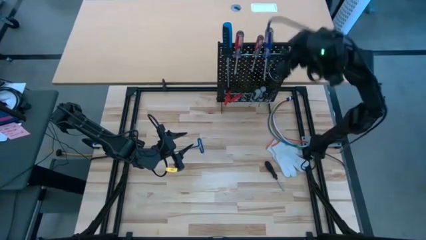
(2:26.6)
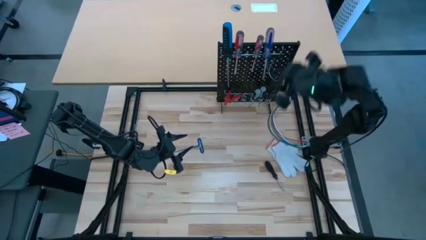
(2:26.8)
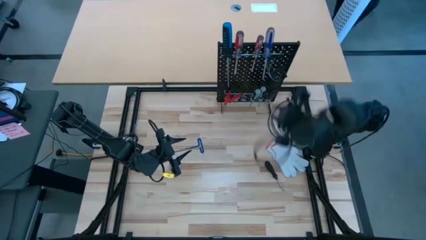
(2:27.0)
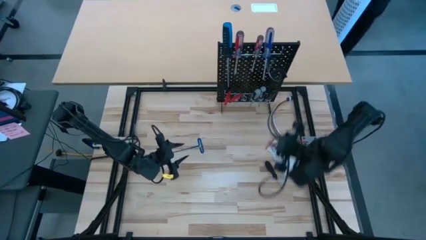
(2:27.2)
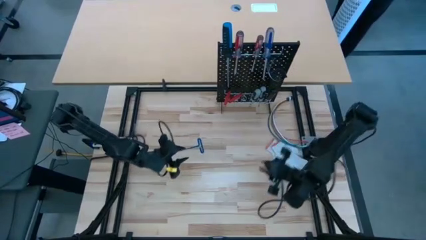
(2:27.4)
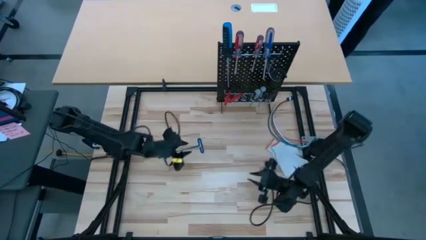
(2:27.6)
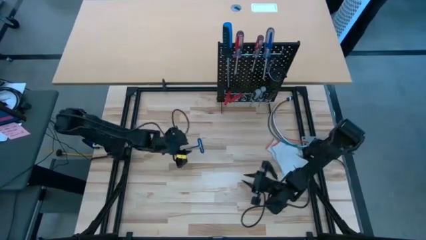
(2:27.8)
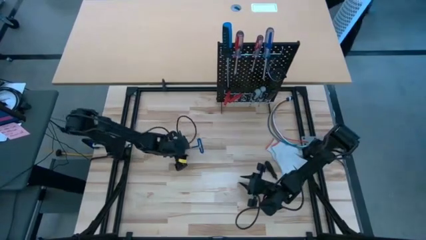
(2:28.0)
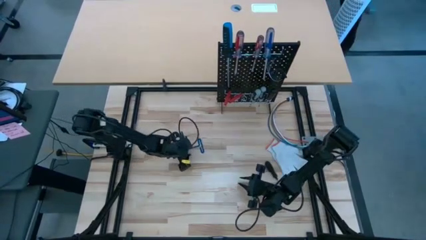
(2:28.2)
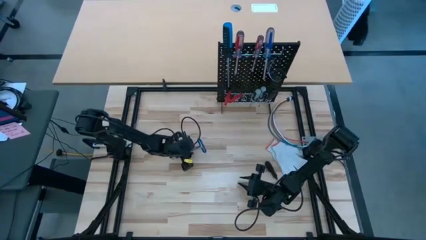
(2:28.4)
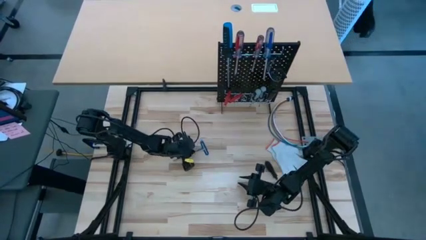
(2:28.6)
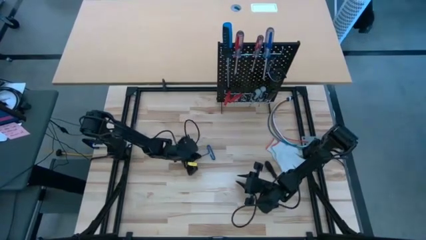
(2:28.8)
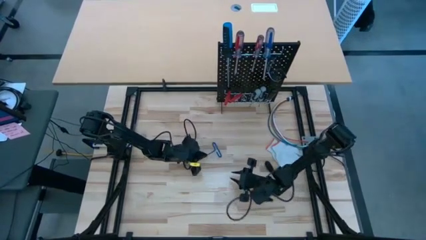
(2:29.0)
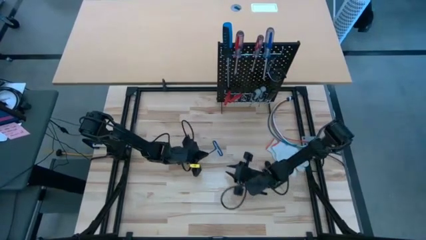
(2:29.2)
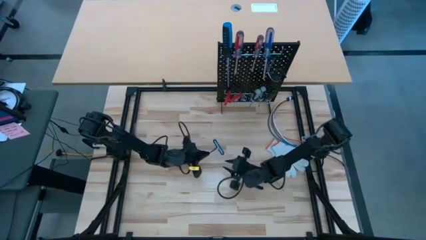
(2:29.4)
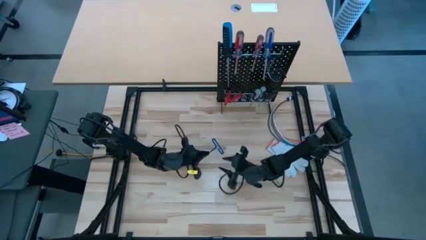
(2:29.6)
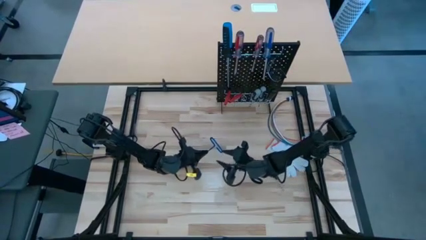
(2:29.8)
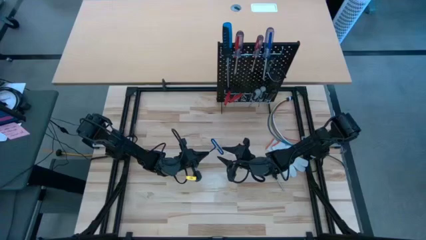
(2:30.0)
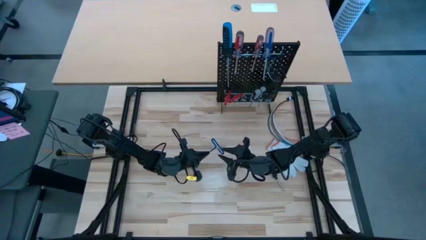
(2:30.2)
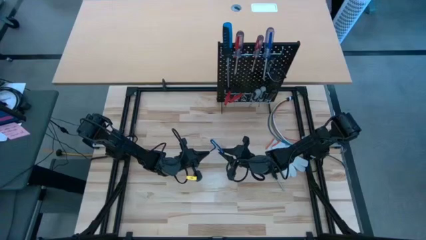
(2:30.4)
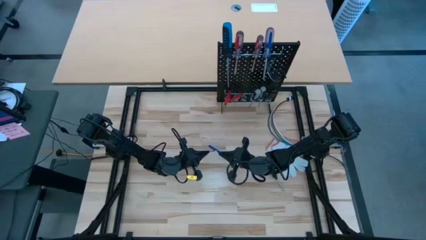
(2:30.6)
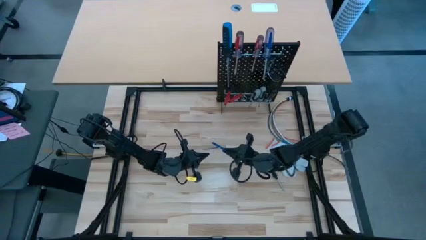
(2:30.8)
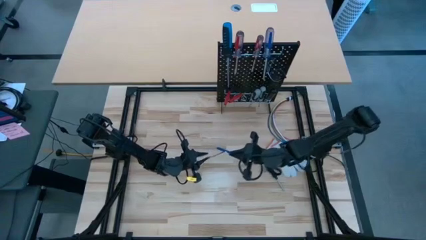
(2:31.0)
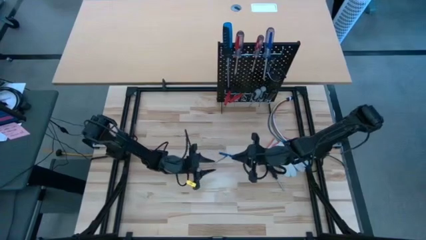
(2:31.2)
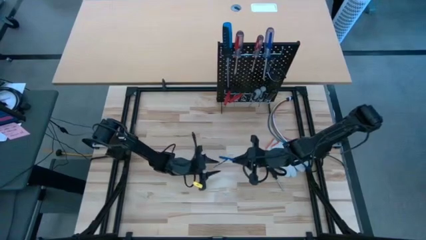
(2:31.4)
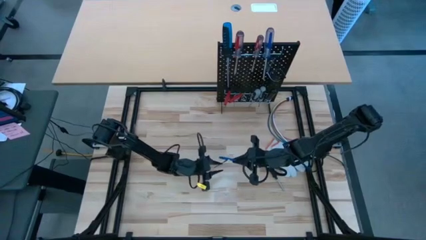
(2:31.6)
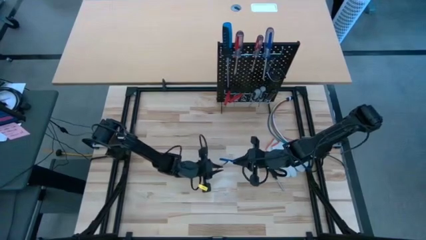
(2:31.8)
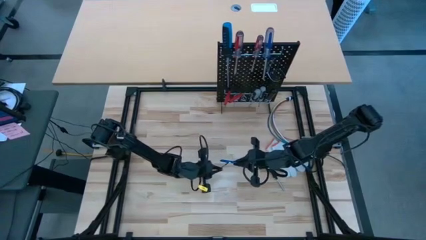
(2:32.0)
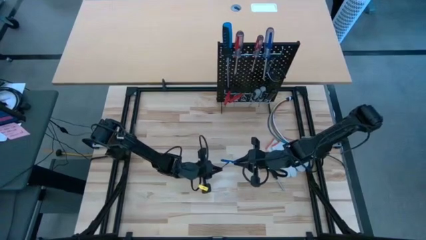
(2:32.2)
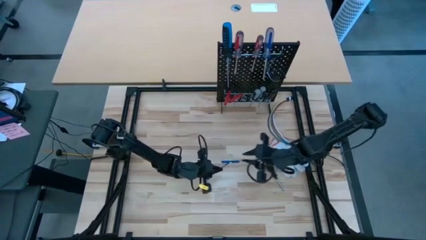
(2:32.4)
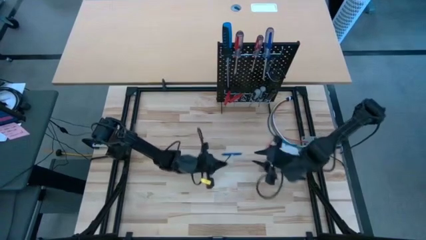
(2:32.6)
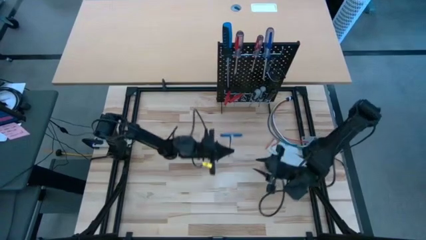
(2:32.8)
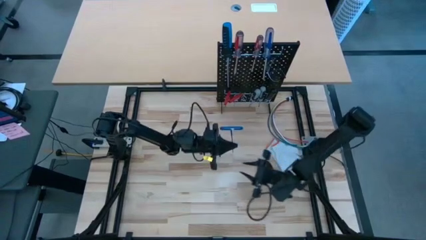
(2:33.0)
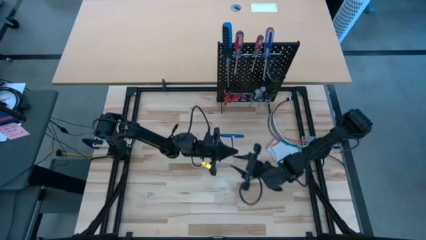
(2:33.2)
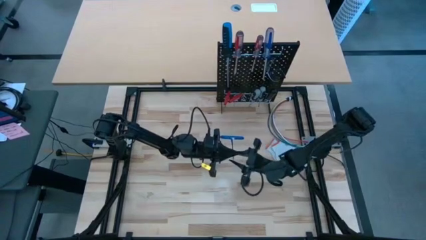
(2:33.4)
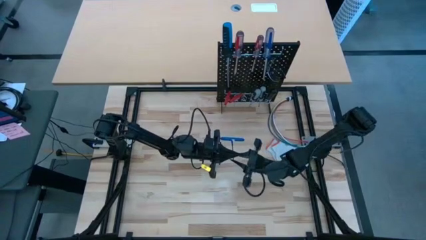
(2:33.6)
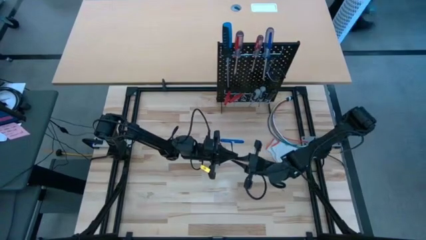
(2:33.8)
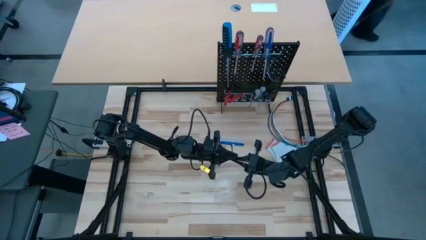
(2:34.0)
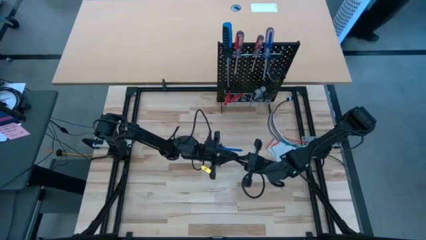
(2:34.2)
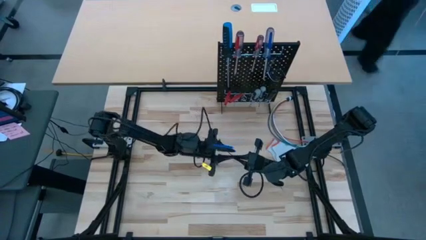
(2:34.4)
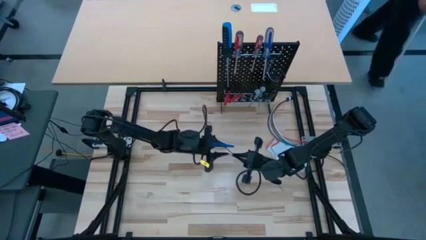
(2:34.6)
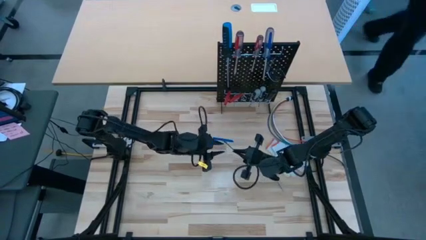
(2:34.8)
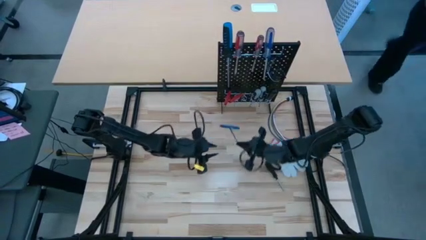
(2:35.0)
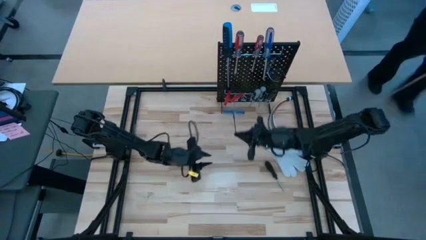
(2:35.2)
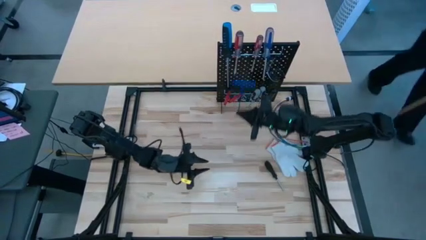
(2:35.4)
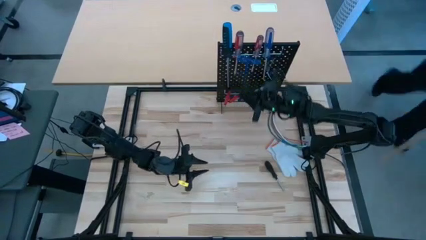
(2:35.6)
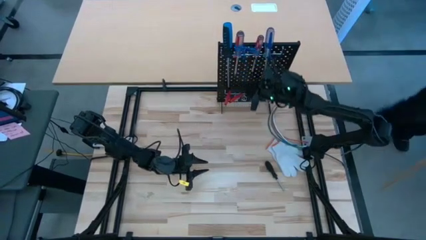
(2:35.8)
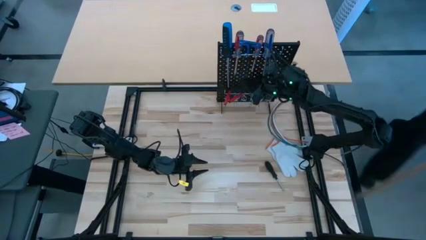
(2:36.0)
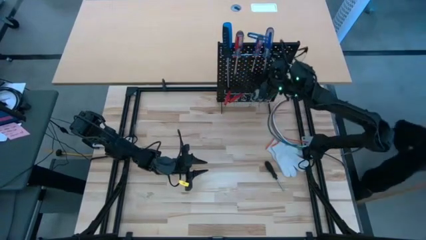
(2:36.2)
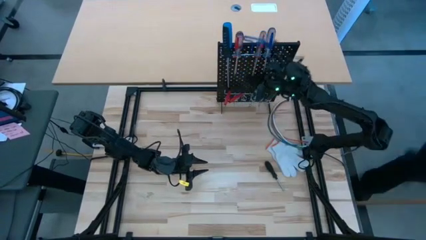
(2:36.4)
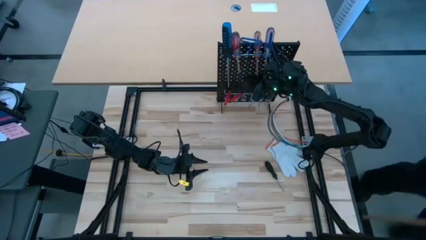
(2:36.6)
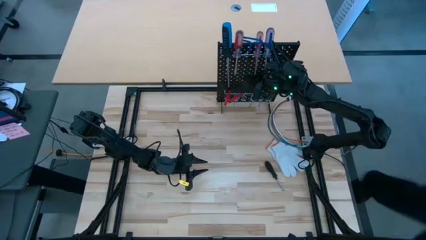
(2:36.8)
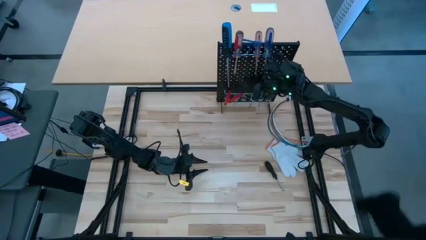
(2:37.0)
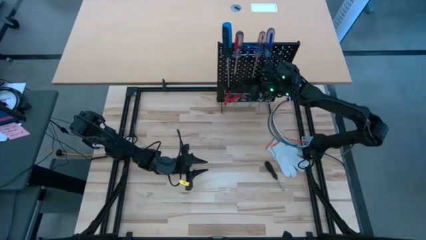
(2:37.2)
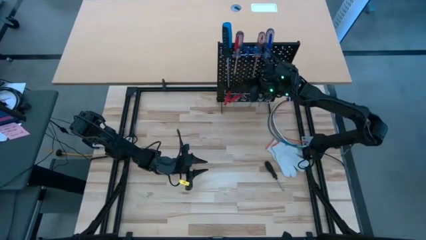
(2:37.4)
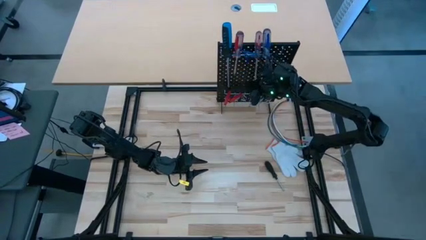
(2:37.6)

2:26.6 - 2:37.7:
Task: Hang tools onto peg board
Hang the blue pick tool on the peg board

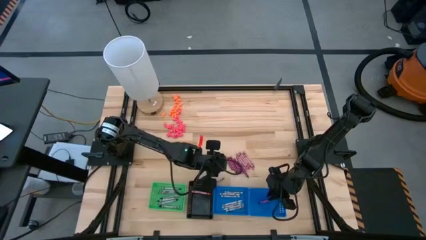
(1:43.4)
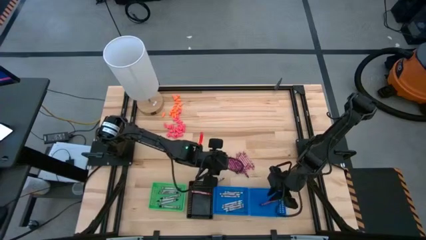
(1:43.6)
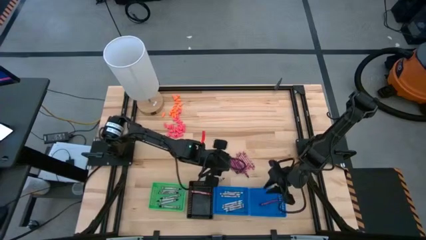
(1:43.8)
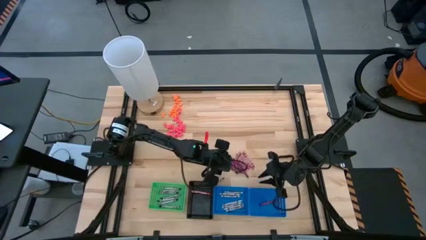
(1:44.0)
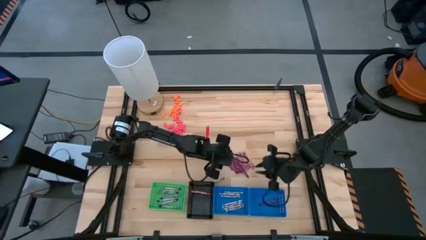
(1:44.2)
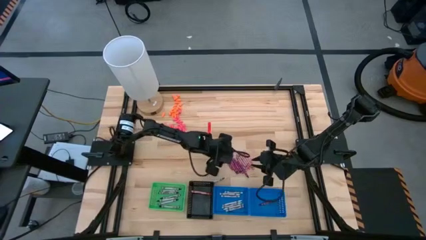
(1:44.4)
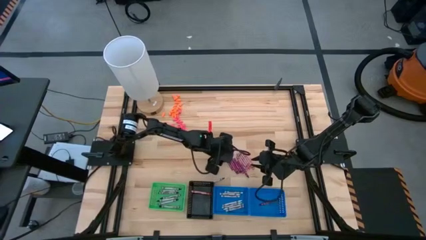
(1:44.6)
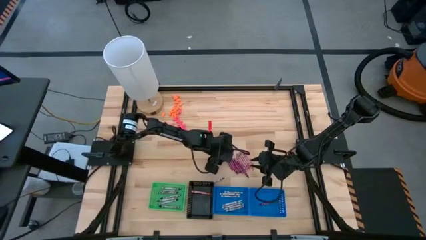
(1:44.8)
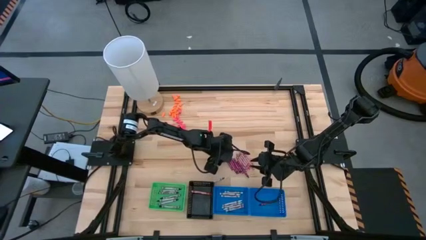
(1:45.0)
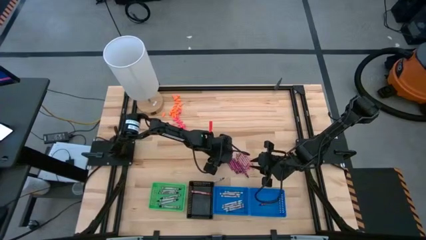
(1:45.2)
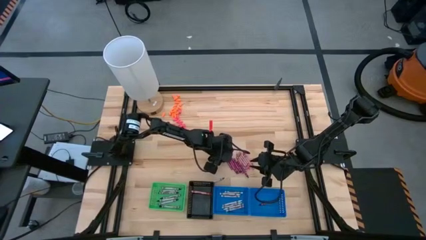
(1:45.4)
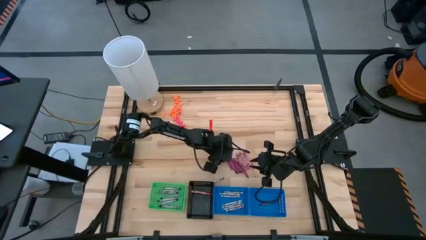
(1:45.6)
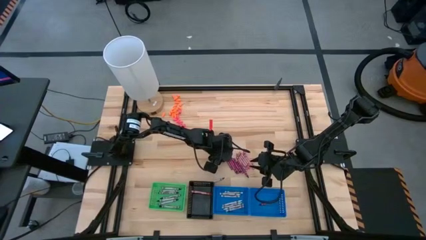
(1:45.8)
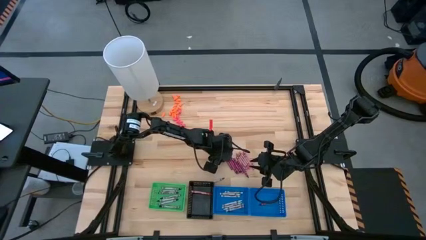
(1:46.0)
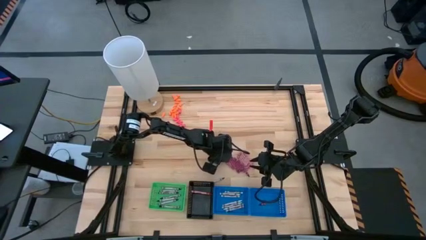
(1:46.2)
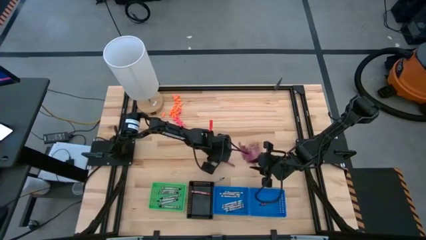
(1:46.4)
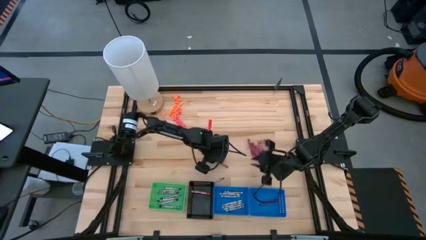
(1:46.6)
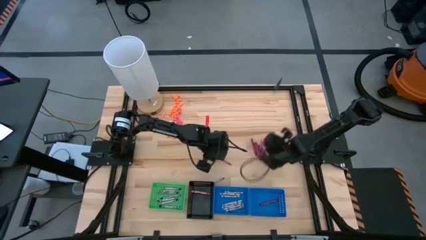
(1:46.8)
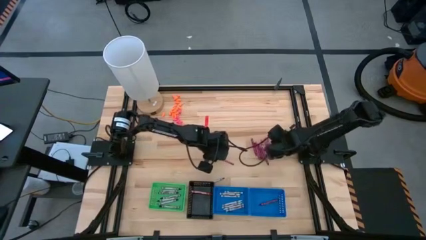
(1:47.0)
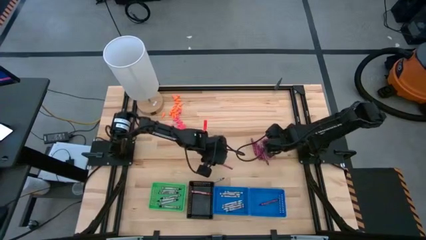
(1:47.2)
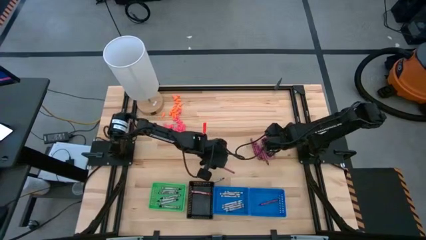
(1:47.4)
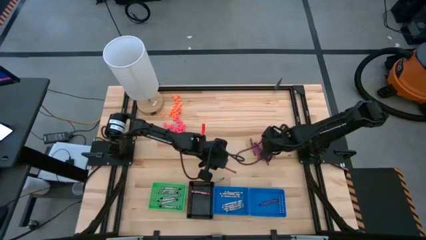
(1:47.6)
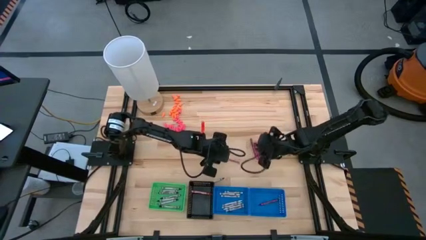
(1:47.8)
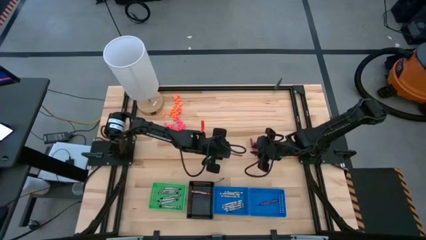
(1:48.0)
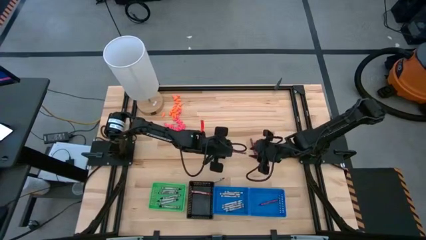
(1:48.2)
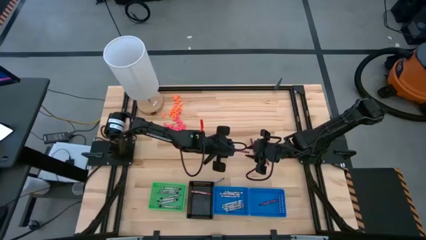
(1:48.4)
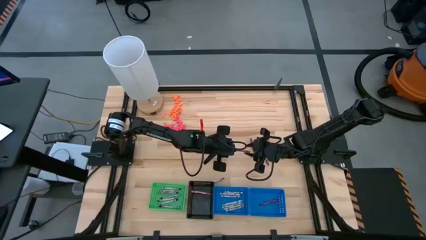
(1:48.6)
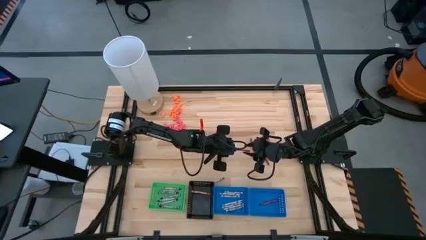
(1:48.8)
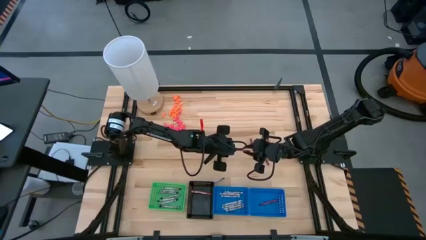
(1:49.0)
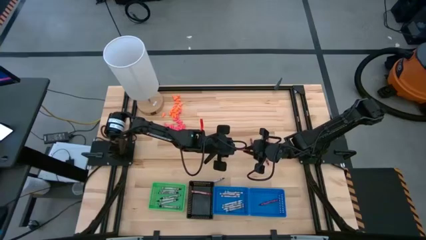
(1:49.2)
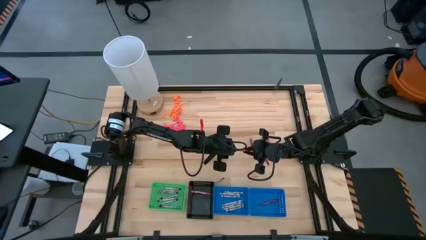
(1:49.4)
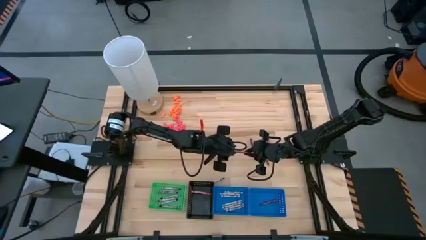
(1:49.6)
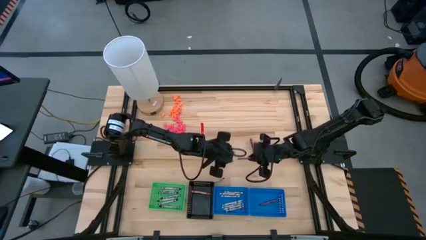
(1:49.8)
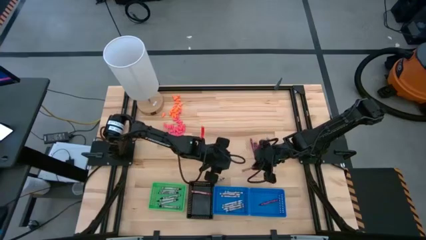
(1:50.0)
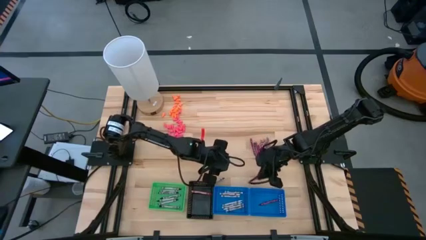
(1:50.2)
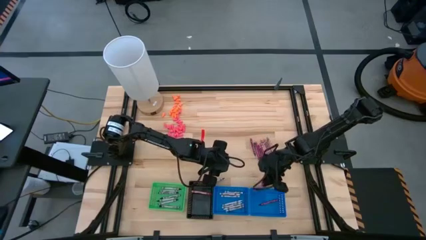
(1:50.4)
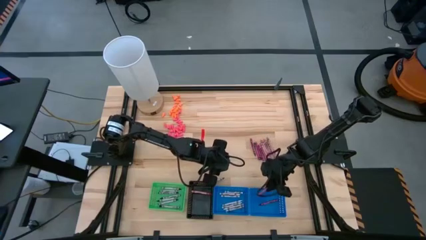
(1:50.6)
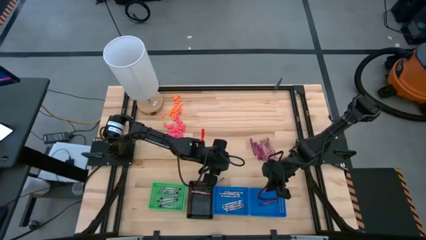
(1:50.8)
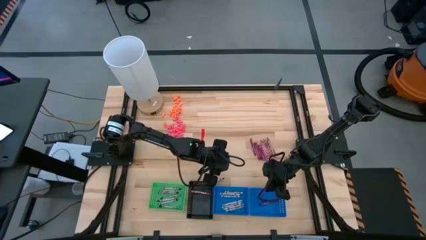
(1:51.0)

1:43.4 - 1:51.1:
Task: Sort crayons
Put the red crayon into the right blue bin
